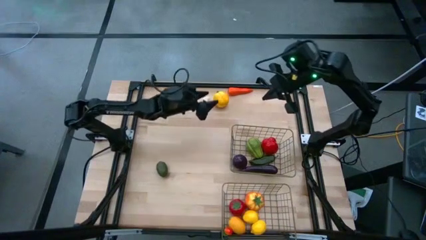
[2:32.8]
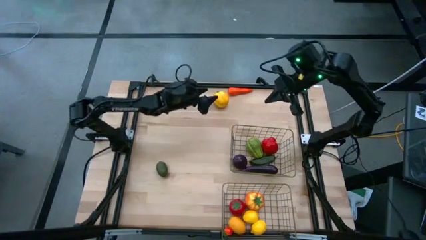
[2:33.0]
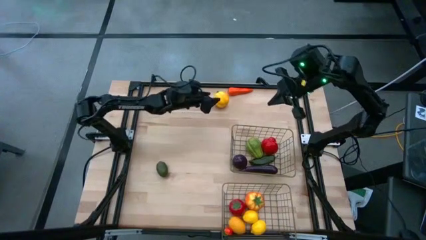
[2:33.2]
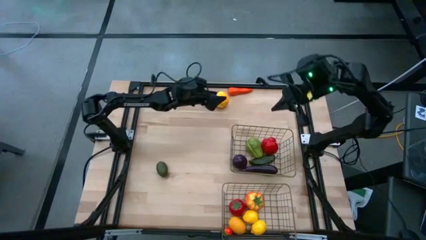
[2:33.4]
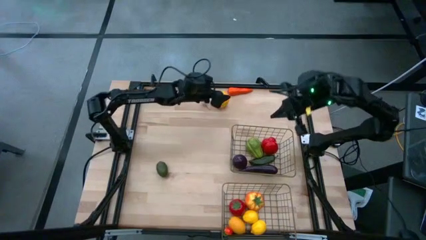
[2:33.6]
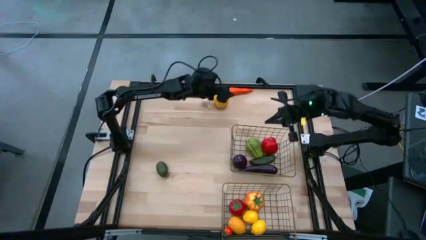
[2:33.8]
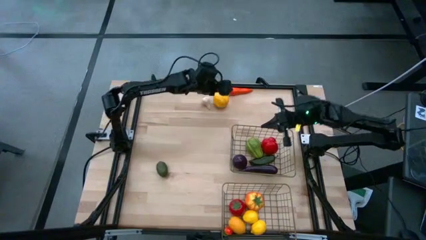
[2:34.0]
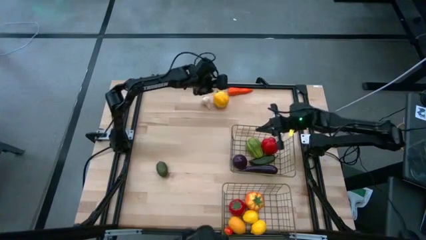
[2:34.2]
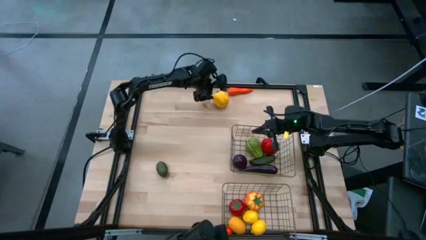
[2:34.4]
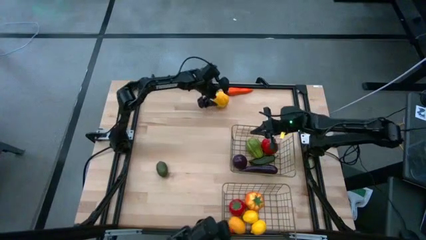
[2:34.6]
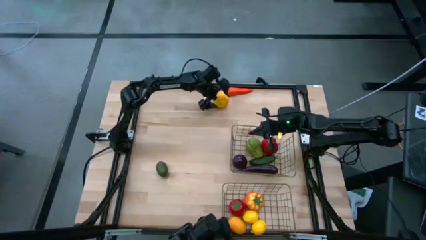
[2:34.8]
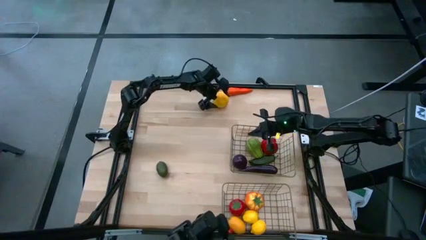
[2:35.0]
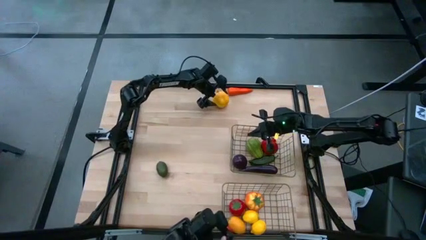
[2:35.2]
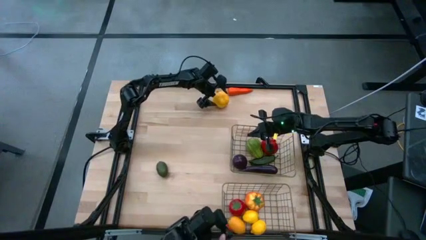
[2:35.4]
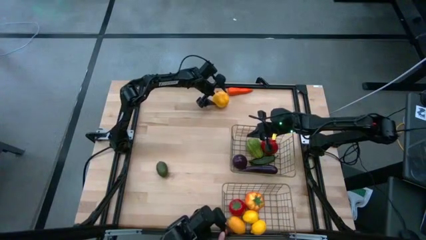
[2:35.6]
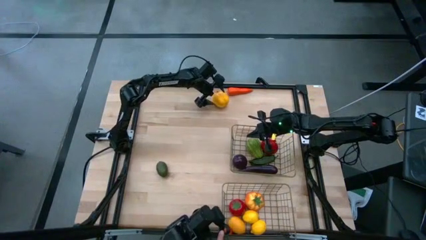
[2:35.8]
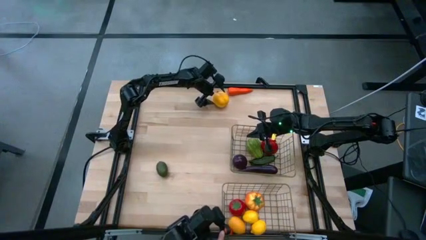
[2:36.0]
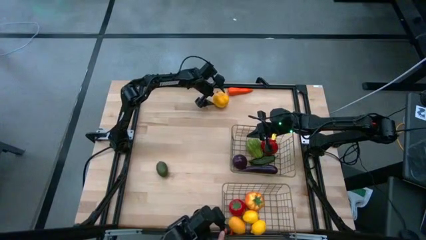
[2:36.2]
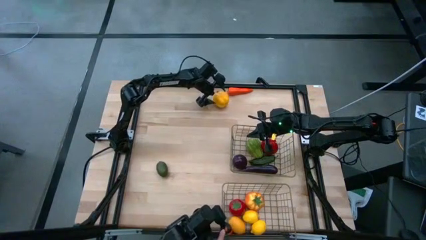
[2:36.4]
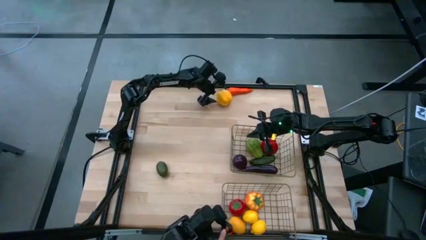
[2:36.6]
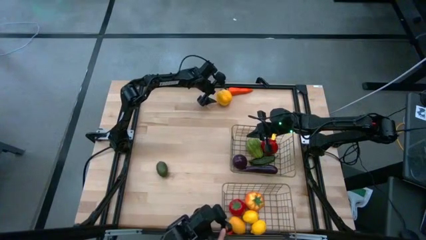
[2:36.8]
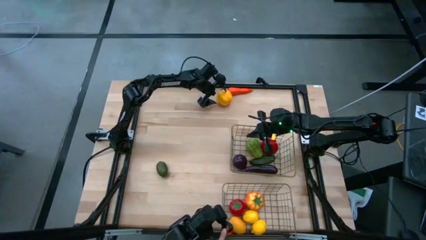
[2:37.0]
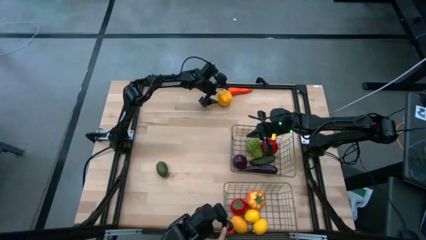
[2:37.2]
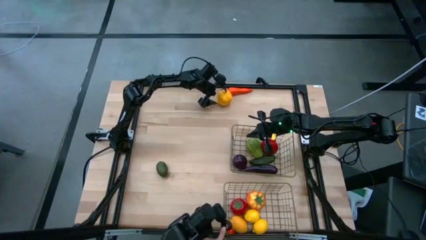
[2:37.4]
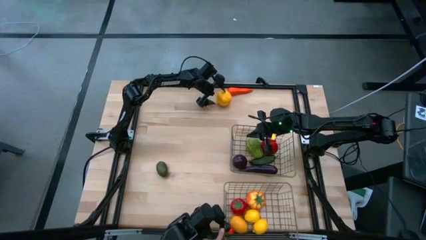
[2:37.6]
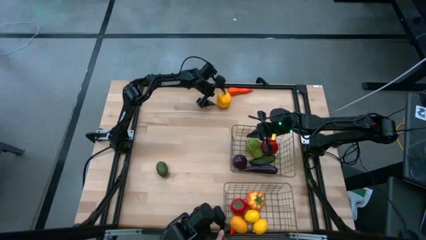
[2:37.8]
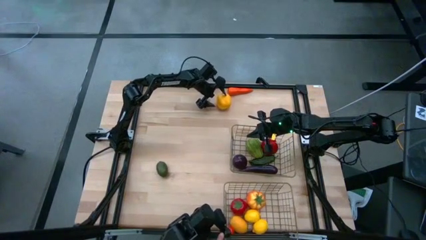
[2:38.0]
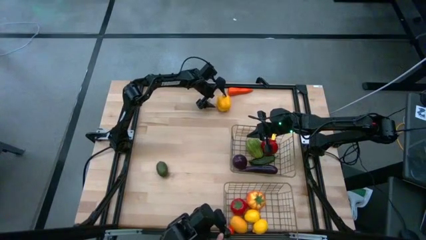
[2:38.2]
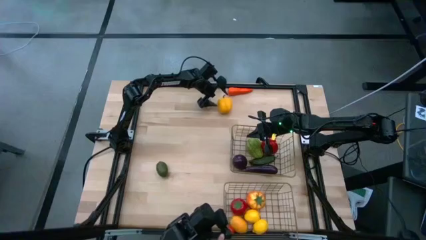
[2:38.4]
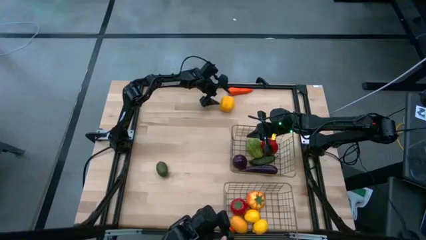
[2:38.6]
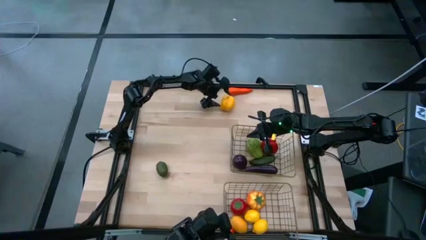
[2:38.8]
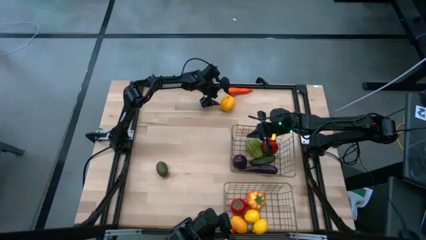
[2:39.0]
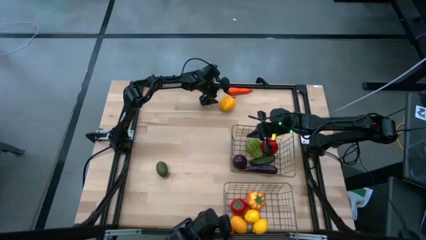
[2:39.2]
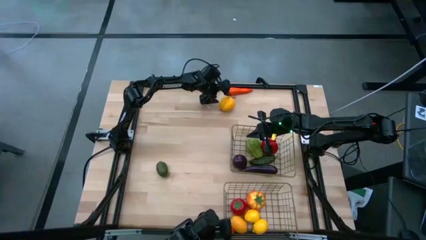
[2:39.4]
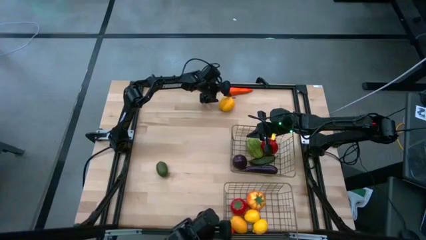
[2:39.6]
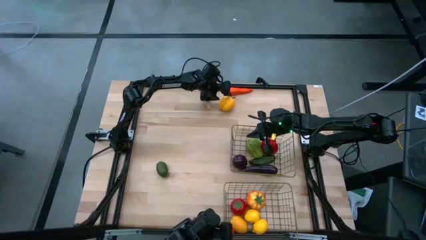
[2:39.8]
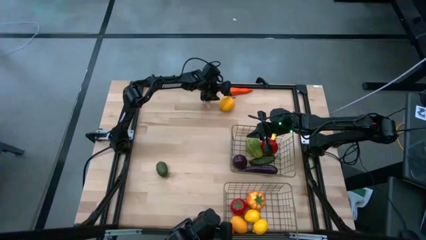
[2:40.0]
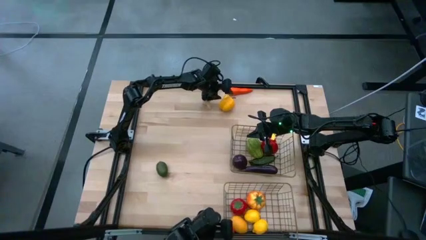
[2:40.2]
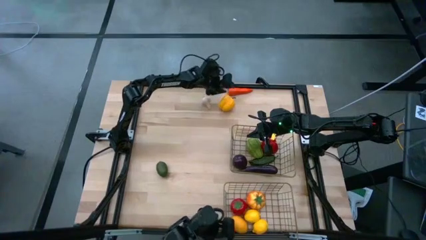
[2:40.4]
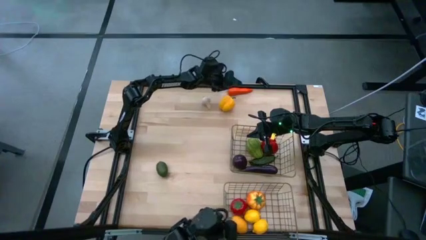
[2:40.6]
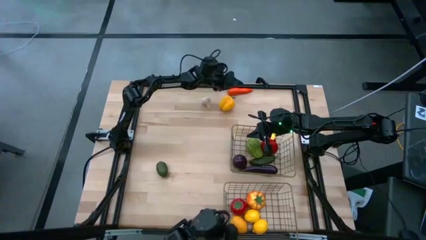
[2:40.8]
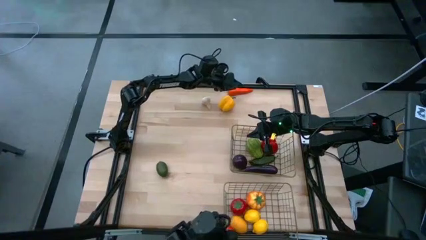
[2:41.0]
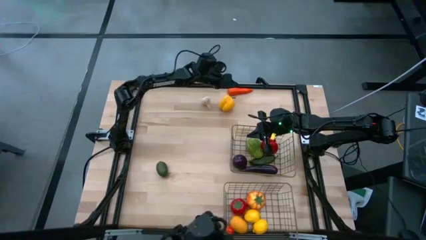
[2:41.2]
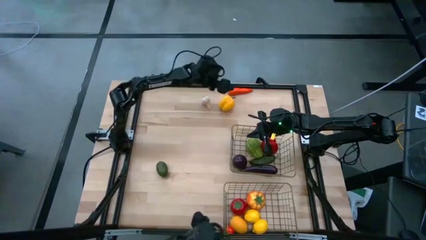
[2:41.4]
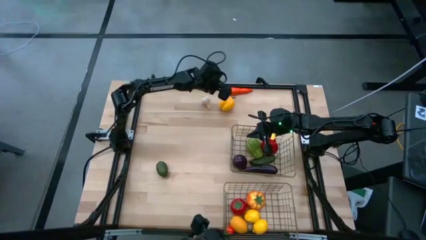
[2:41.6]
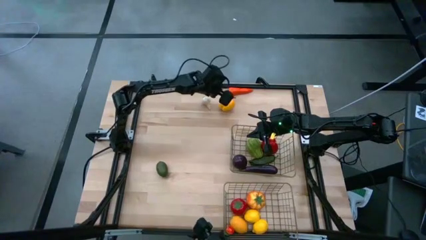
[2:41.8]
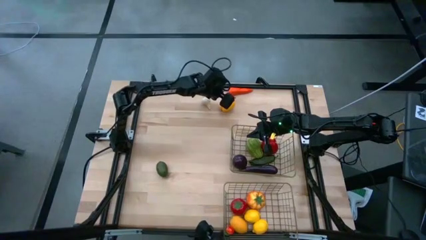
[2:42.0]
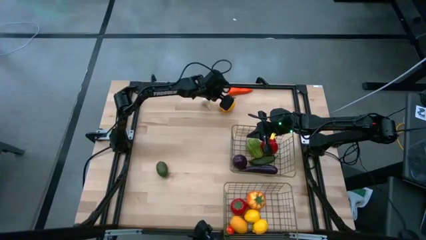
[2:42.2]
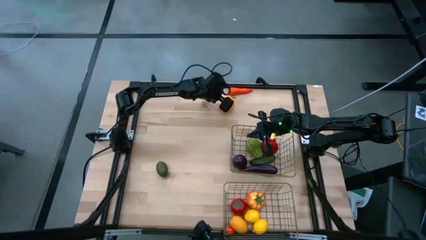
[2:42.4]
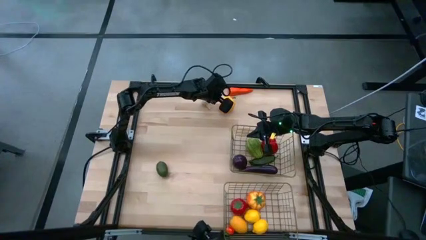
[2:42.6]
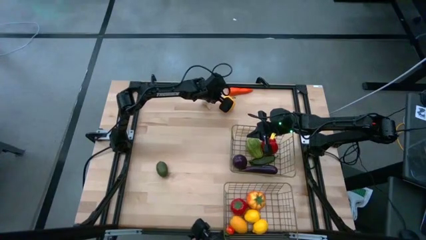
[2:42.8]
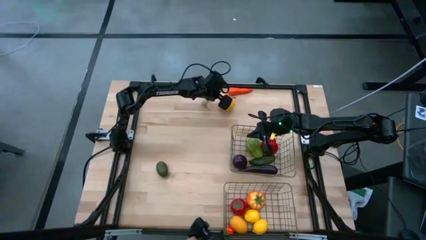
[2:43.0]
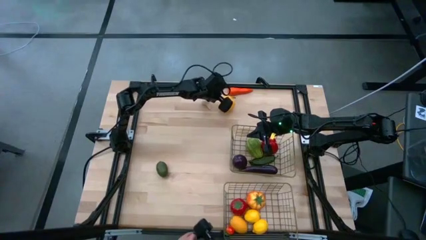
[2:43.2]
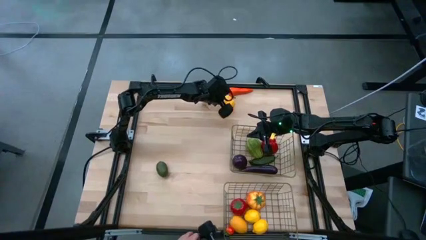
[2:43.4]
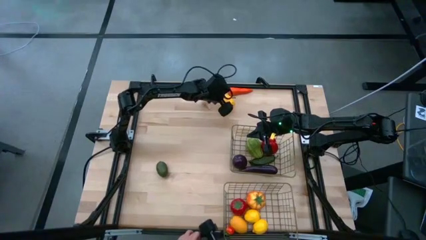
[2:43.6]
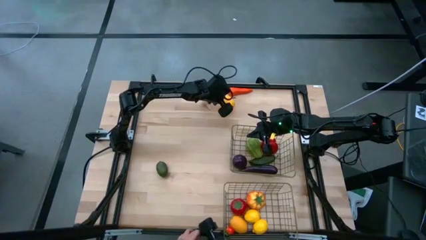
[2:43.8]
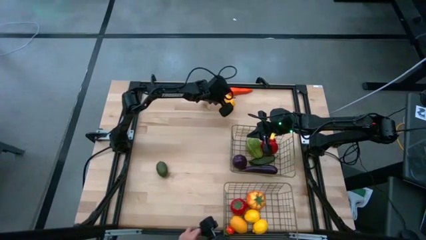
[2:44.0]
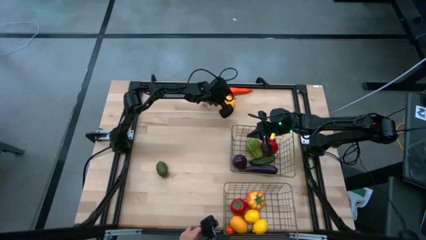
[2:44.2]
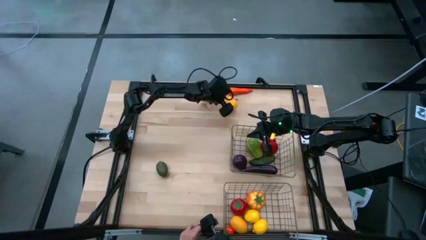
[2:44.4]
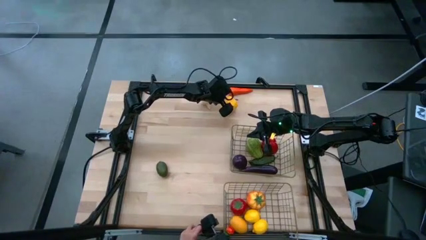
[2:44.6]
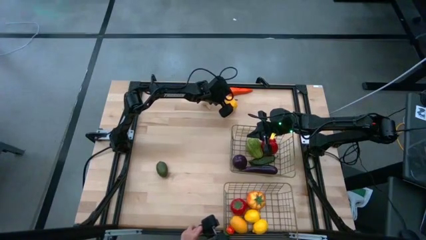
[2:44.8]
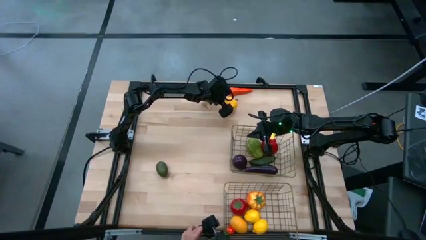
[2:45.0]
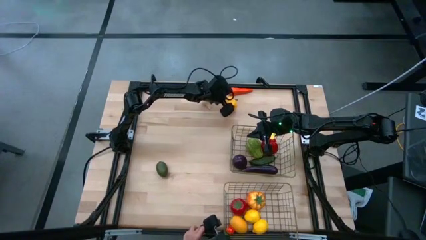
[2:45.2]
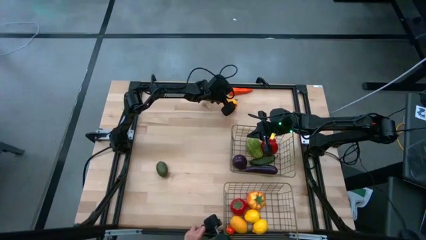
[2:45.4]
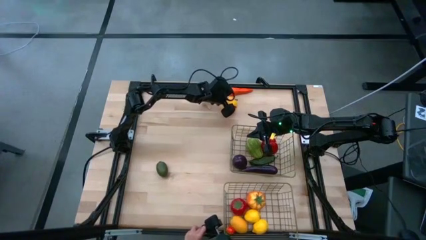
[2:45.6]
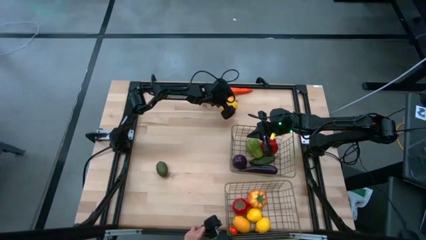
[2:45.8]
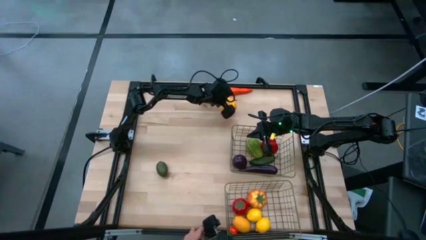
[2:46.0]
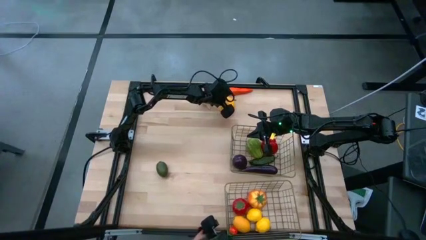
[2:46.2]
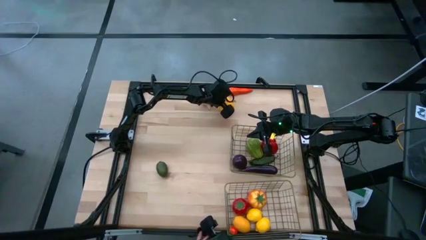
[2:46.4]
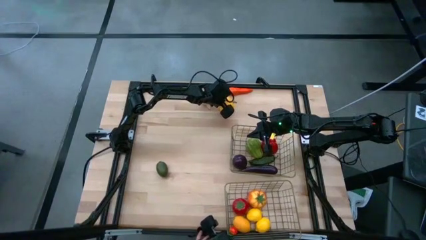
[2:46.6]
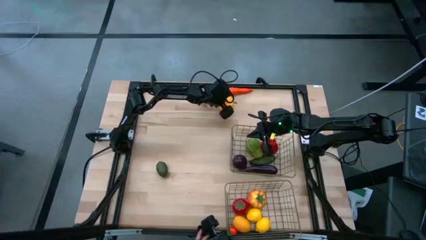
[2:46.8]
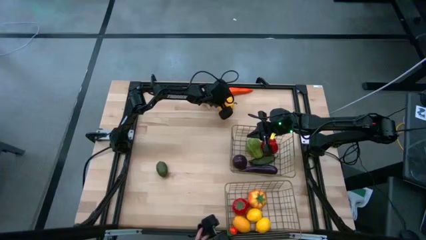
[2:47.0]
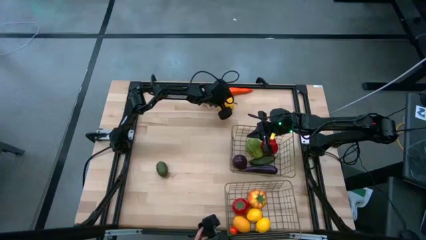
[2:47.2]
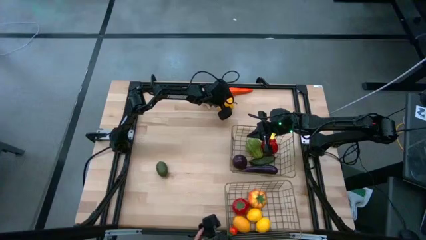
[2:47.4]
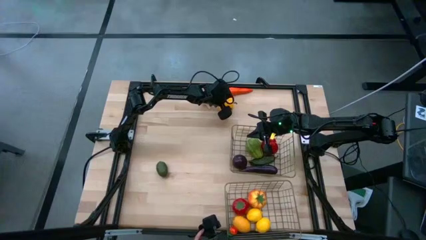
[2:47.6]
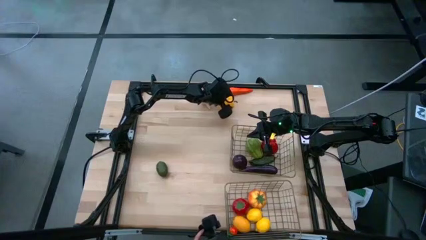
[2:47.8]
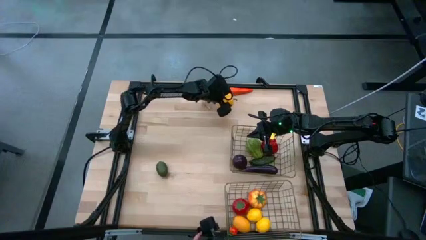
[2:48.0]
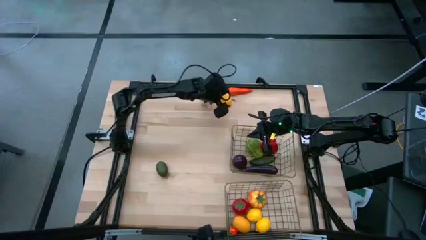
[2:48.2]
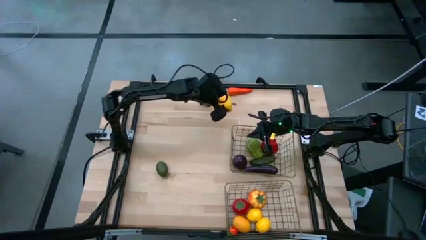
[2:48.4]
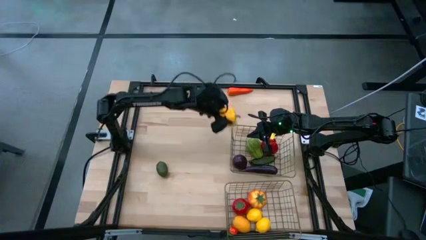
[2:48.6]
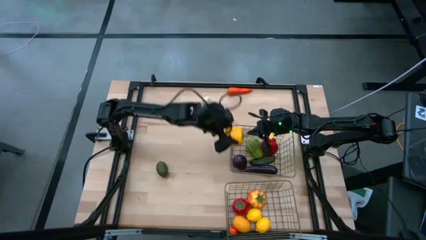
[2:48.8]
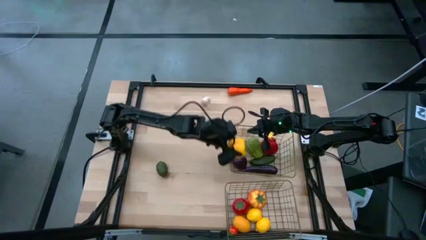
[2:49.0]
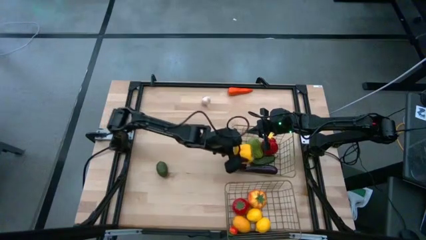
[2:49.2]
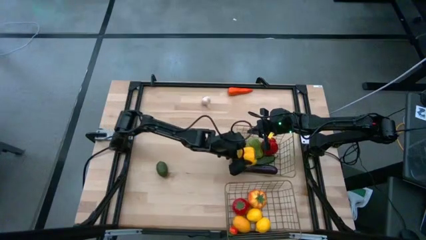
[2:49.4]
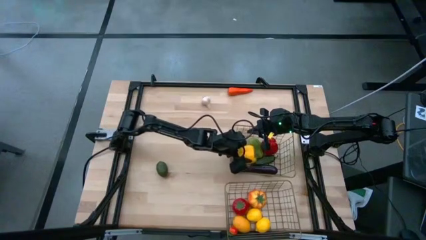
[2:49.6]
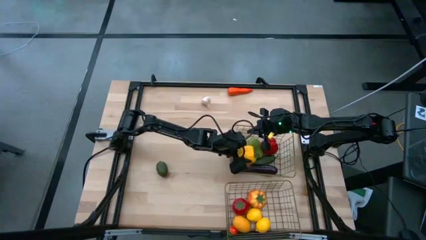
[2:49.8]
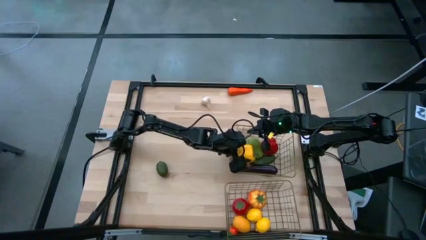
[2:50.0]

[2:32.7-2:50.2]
Task: Sort produce into baskets
Put the yellow bell pepper into the top wire basket
